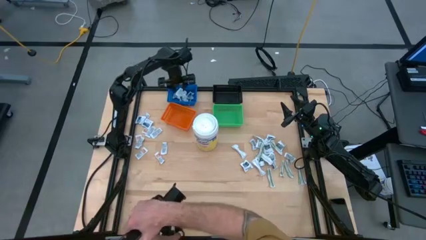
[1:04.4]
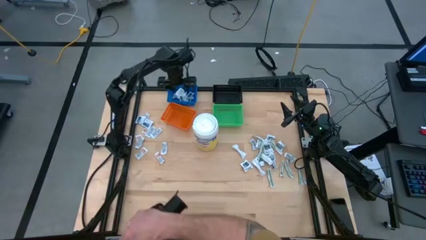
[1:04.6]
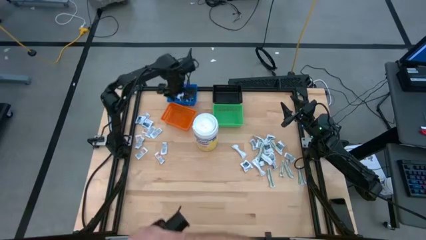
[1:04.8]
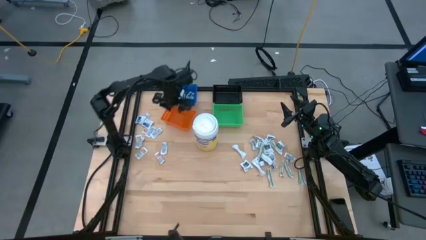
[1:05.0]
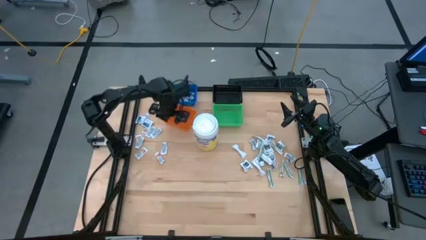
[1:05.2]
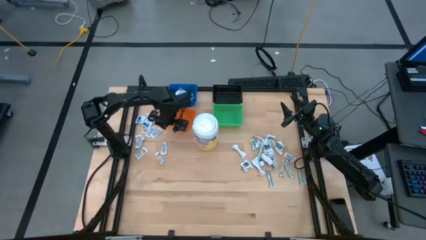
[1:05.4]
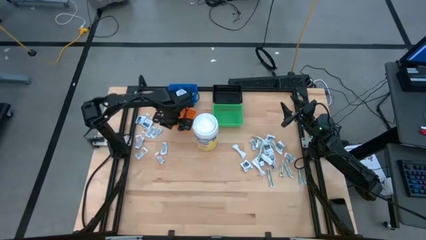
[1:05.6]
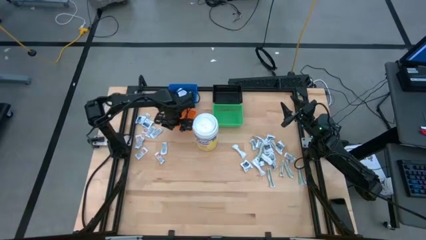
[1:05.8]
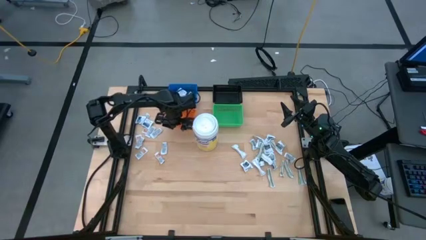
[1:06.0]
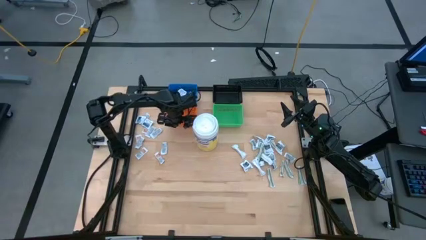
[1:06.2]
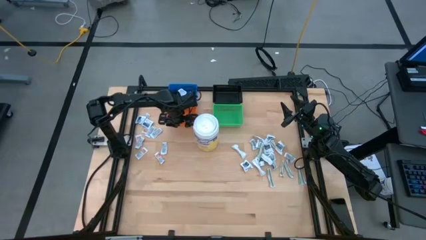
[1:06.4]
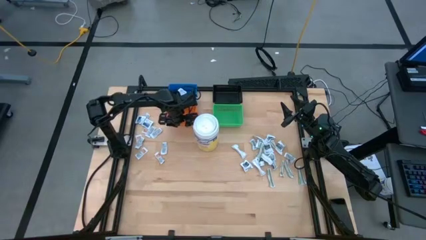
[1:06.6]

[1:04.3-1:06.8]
Task: Pick & Place First Aid Supplies
Adjust the orange bin

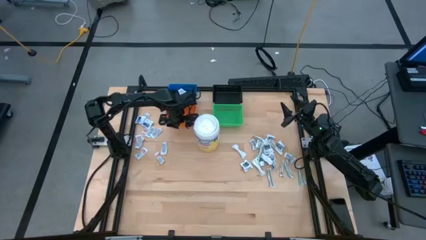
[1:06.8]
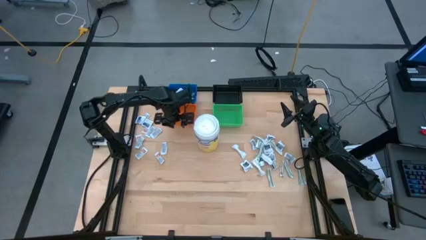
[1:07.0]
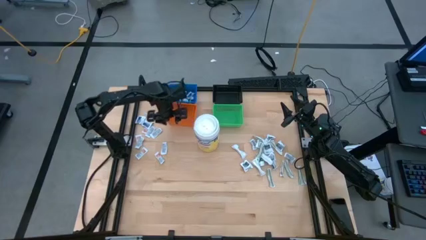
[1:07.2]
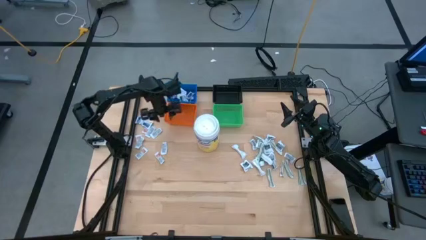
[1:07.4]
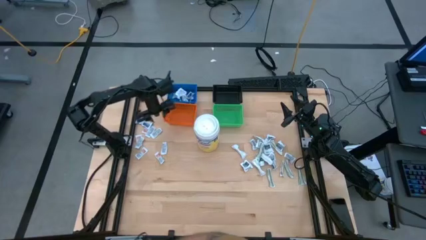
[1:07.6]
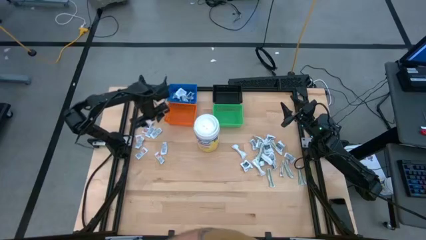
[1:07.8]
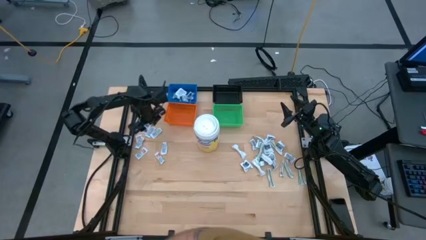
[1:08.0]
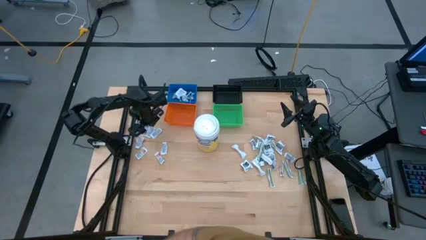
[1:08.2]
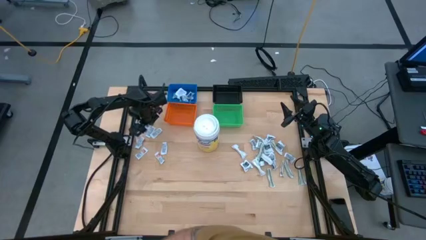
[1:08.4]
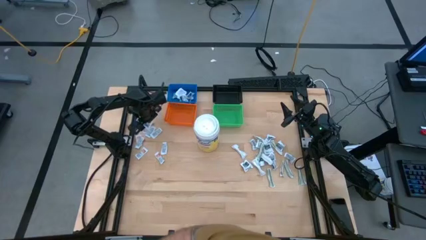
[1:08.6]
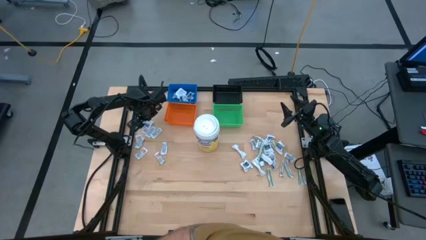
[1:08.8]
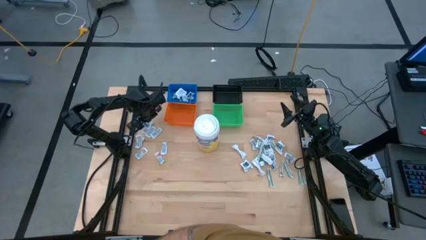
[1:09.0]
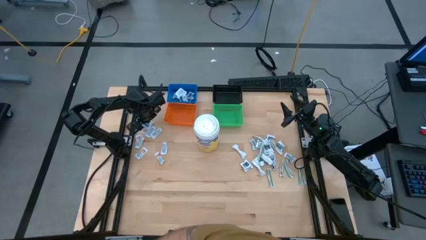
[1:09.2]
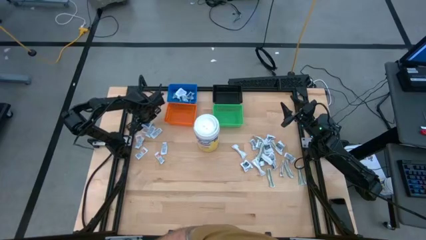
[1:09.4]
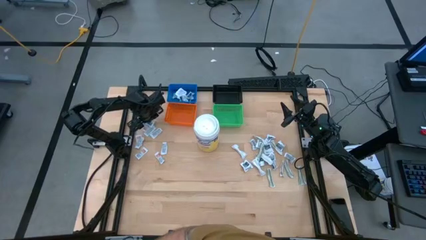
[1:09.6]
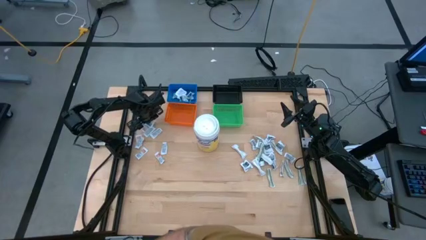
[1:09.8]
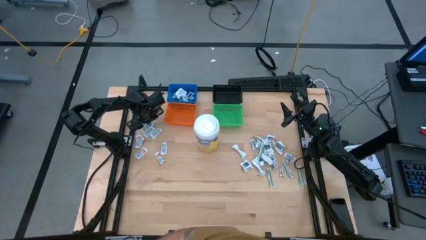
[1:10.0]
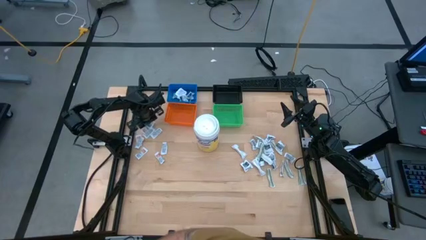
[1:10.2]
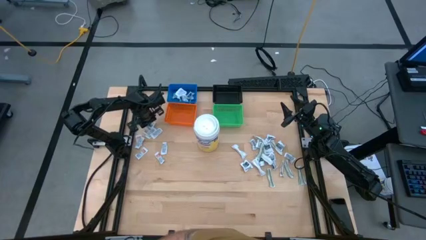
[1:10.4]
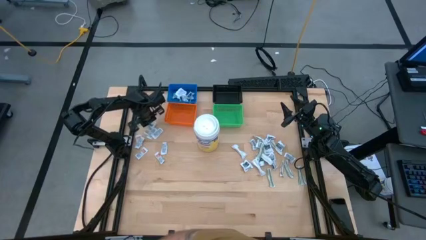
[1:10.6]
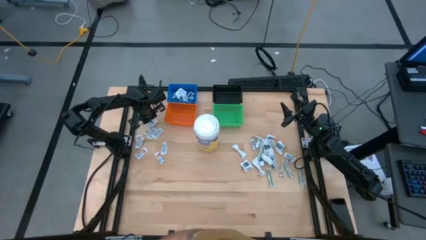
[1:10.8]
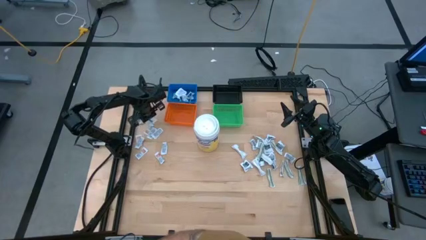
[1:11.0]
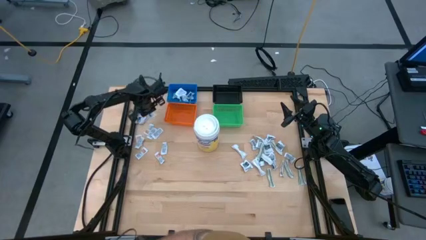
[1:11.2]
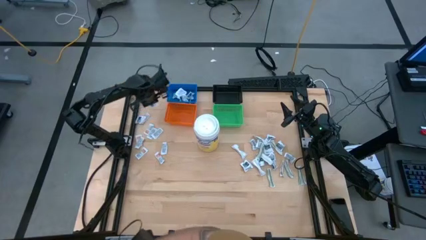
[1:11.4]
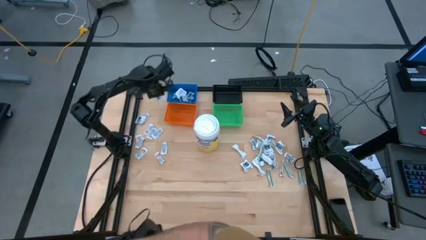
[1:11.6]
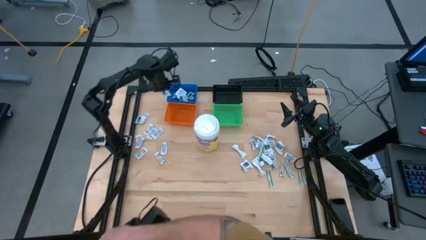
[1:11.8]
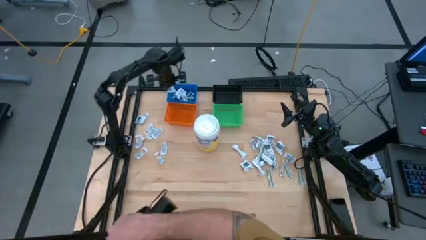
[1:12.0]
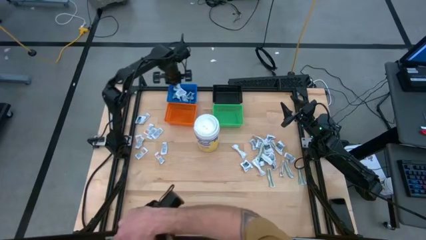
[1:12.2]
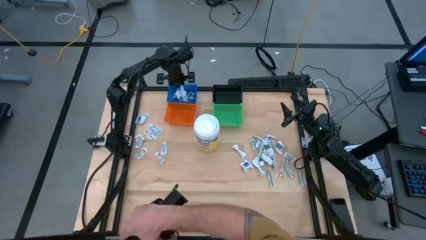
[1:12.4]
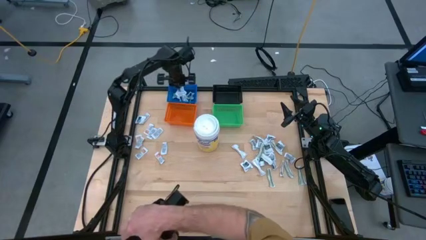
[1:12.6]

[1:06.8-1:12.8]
Put the blue alcohol pad into the blue bin

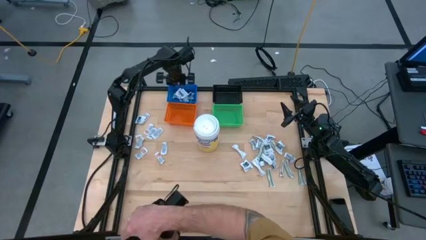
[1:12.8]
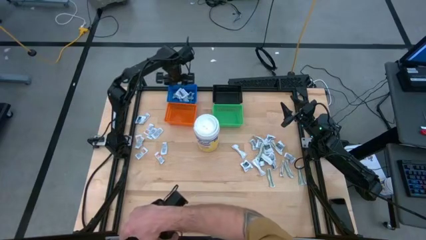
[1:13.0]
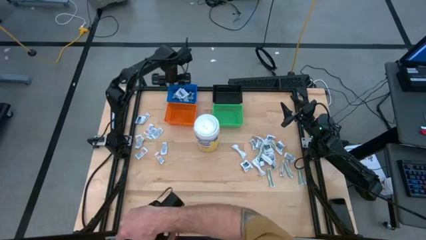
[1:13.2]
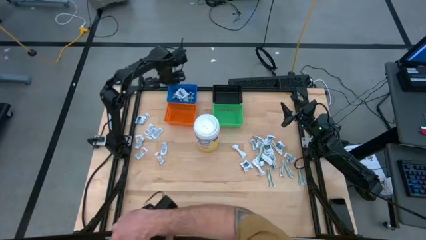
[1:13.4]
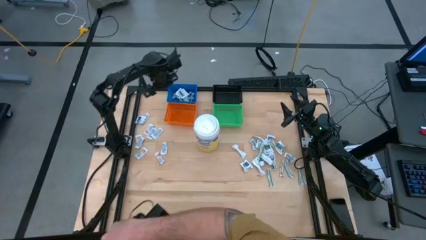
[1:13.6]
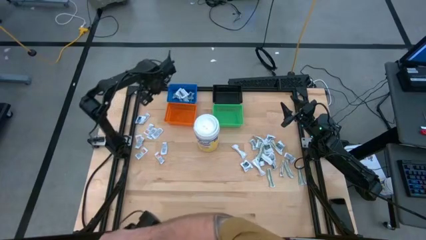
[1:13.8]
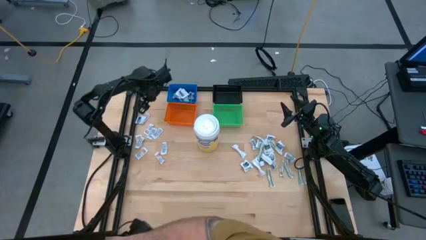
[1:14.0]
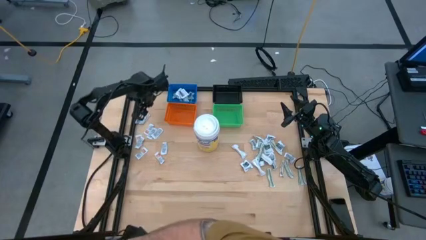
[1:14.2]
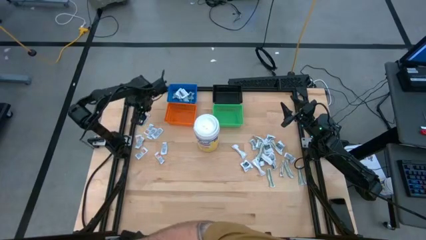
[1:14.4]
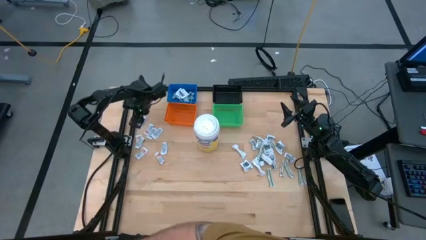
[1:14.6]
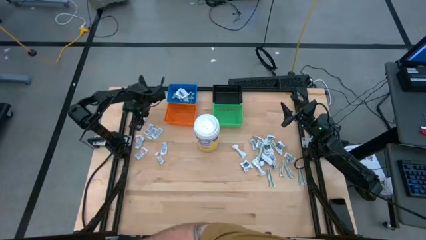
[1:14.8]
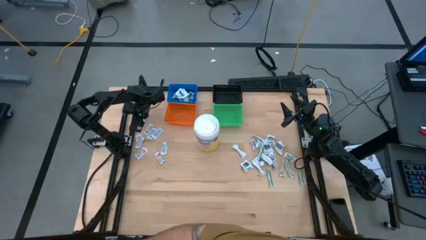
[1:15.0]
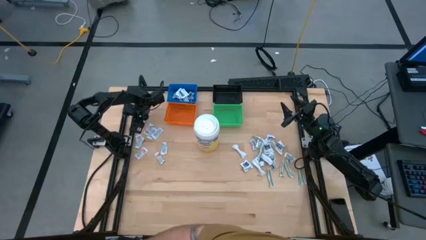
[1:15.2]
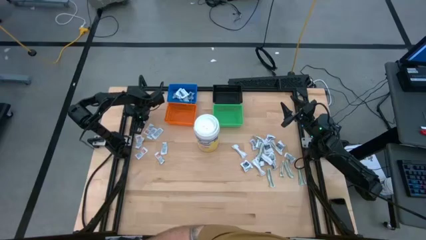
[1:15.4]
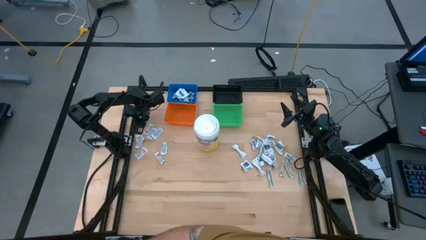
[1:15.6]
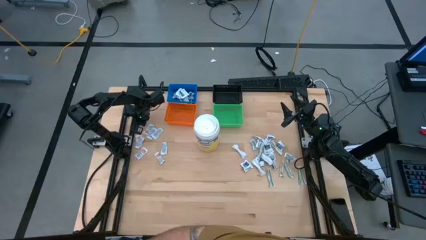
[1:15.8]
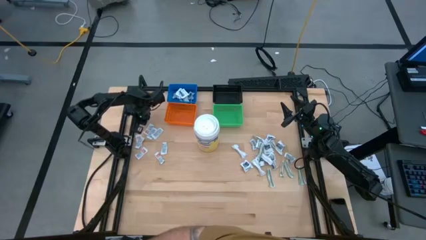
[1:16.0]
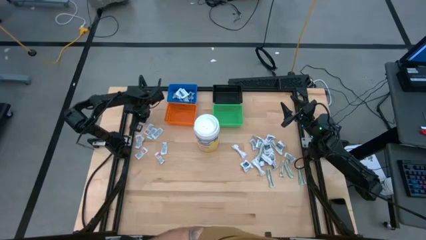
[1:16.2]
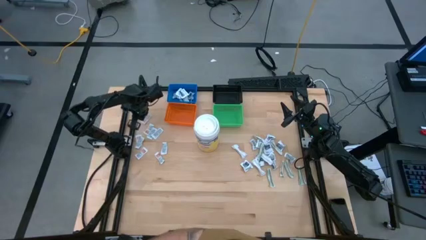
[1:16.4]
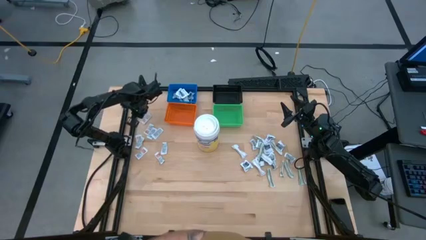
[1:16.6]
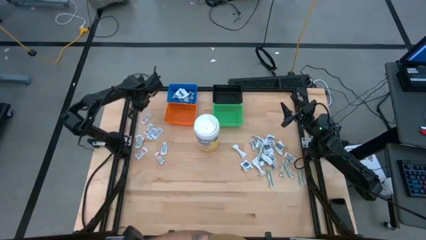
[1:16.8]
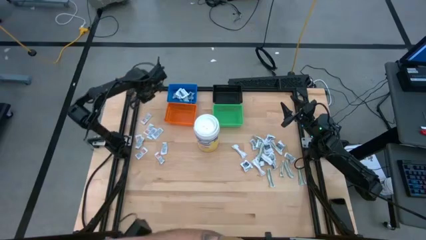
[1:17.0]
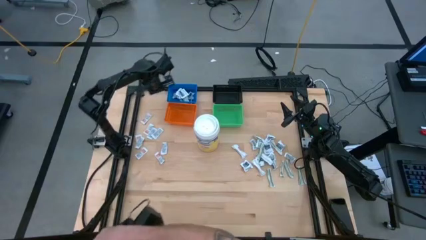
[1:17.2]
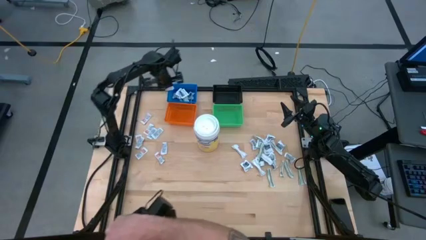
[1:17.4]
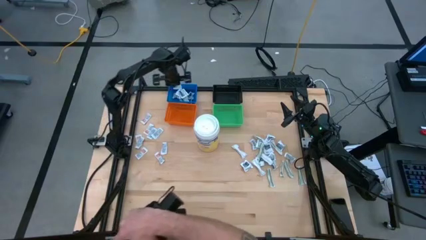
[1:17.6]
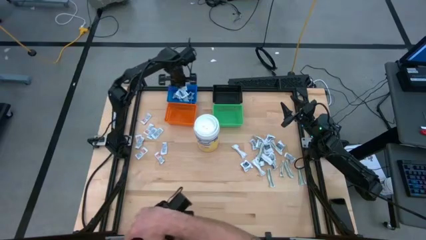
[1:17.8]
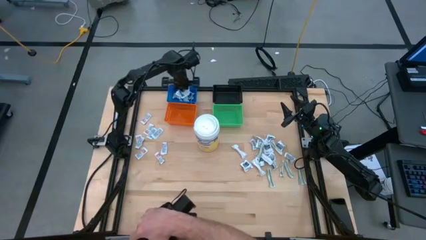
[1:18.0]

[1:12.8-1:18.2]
Put the blue alcohol pad into the blue bin

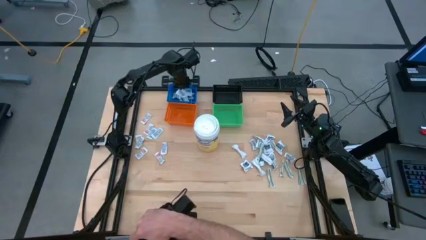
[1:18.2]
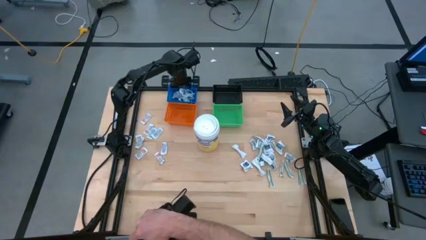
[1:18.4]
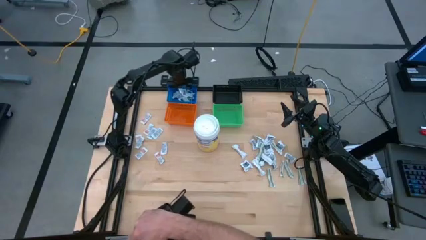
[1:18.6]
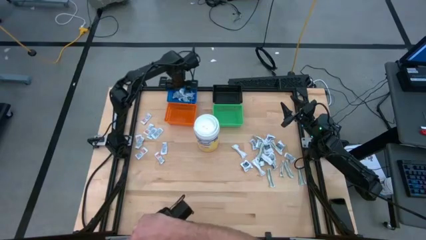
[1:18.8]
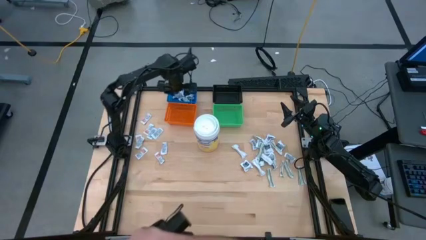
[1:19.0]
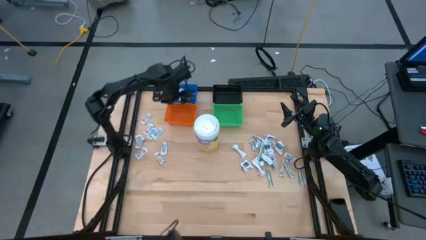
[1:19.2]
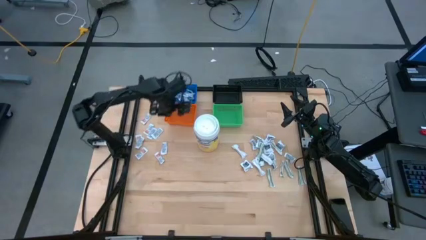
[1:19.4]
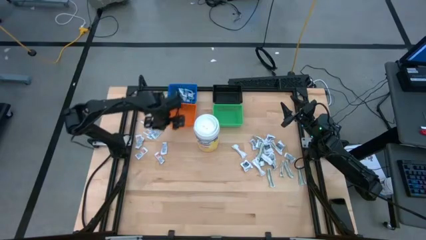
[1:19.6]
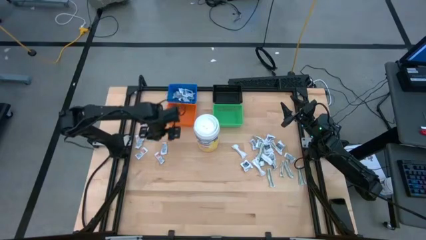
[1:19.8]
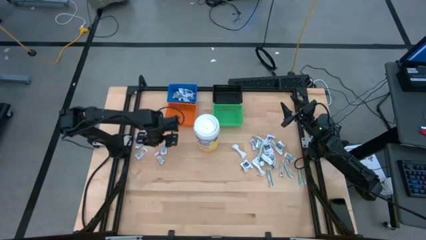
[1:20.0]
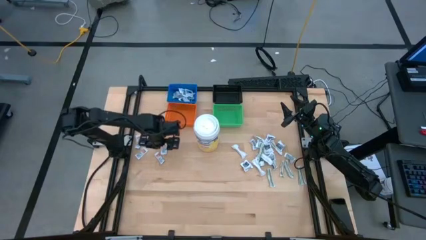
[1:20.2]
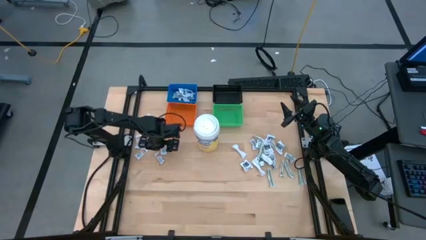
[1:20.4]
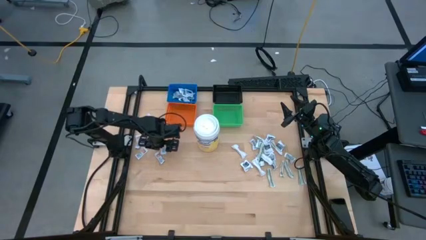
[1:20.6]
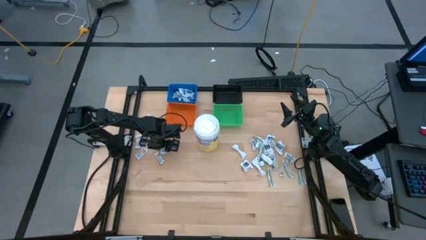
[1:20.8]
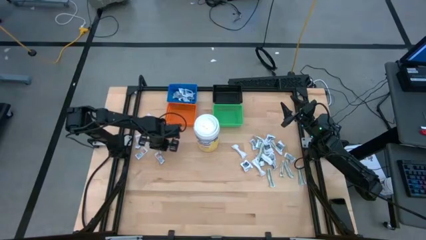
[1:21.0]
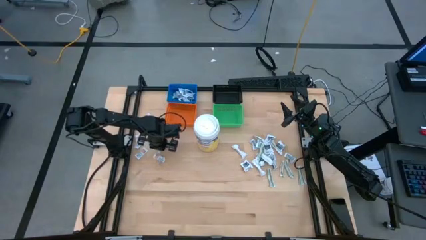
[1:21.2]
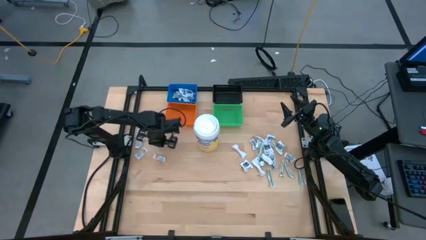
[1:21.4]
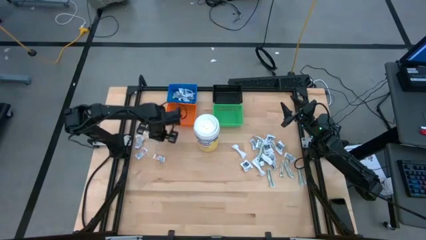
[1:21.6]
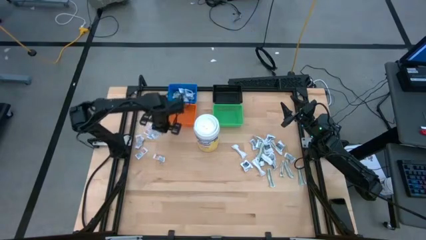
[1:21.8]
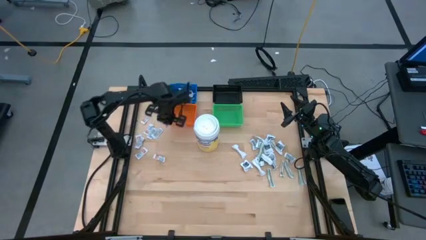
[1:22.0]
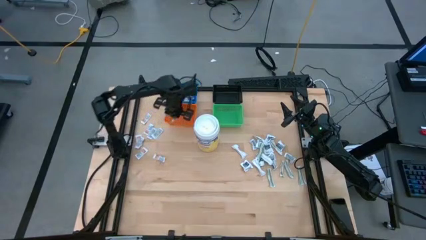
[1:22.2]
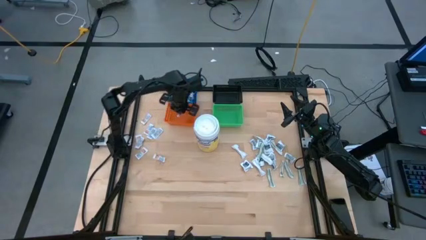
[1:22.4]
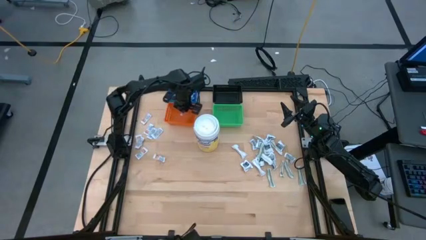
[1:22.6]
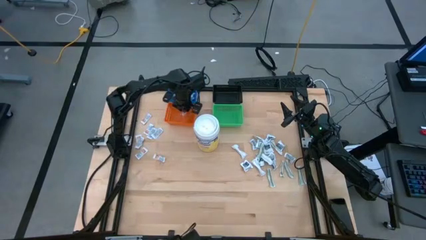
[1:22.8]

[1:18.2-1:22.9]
Put the orange ointment pack into the orange bin
